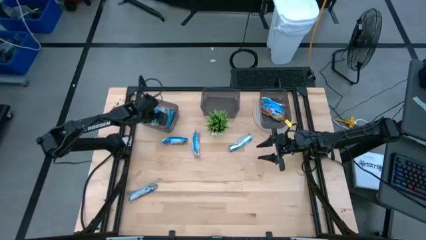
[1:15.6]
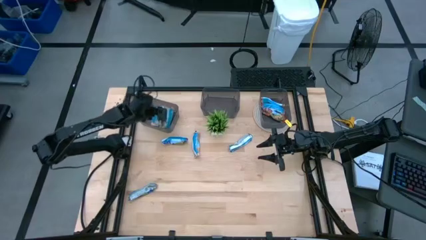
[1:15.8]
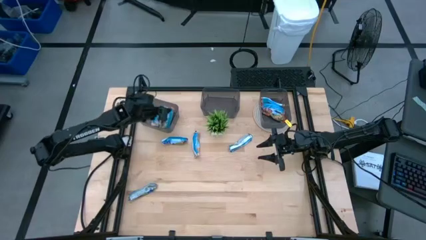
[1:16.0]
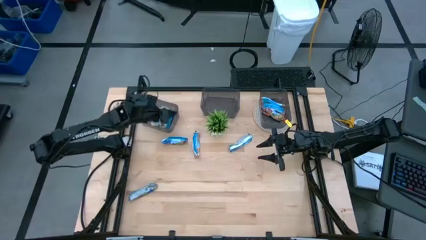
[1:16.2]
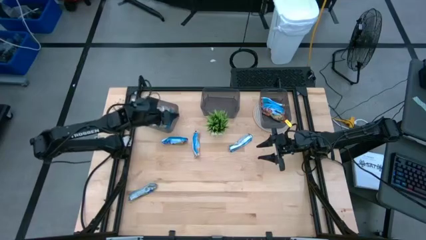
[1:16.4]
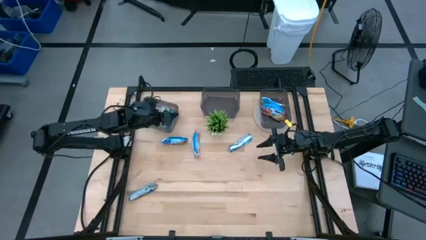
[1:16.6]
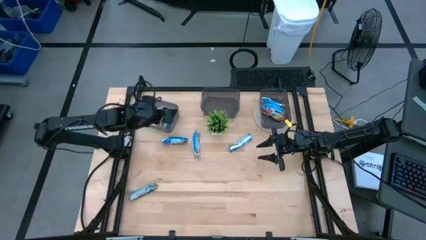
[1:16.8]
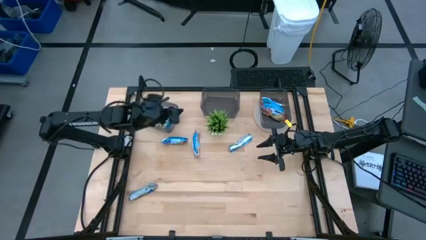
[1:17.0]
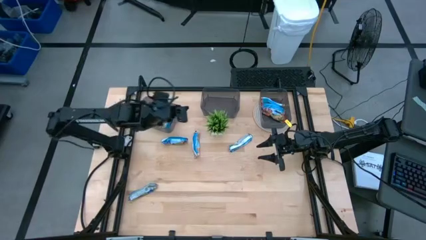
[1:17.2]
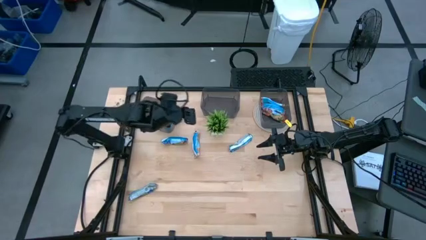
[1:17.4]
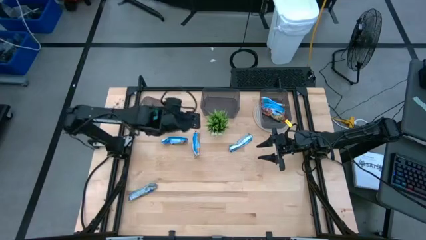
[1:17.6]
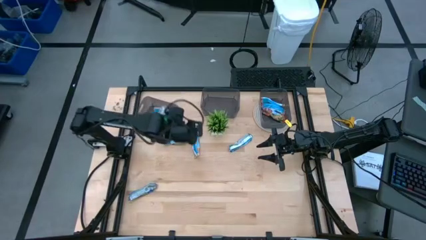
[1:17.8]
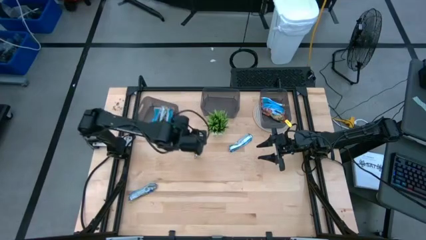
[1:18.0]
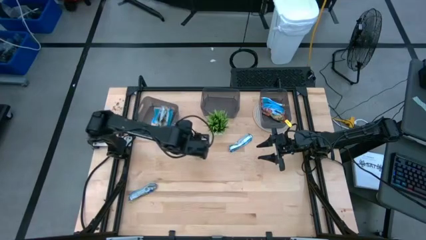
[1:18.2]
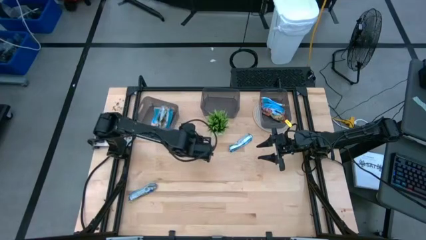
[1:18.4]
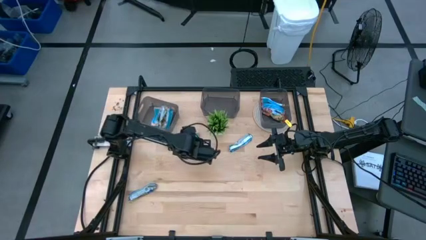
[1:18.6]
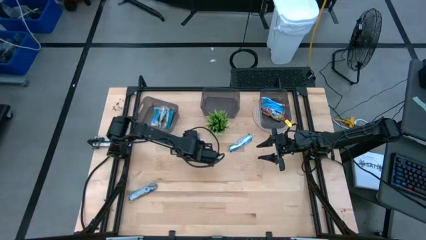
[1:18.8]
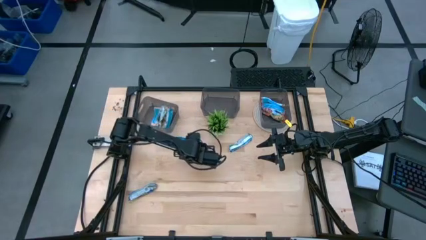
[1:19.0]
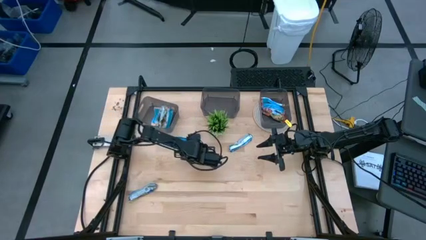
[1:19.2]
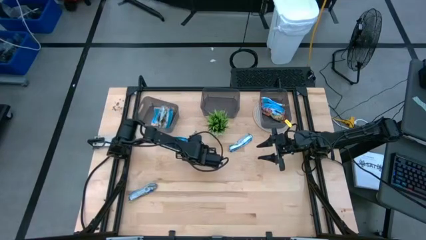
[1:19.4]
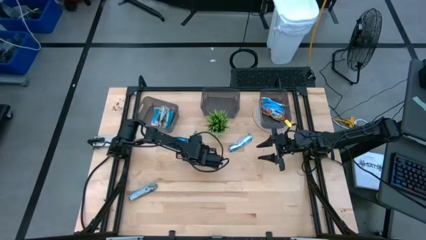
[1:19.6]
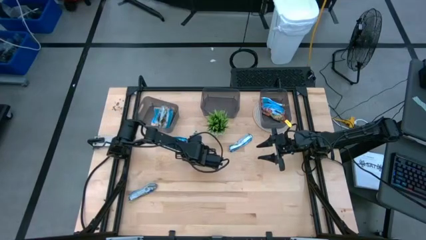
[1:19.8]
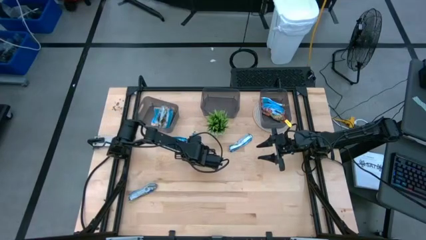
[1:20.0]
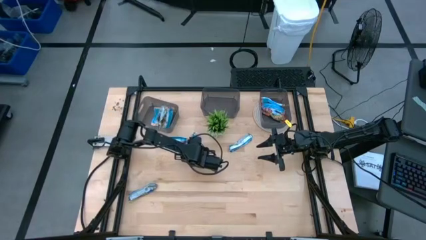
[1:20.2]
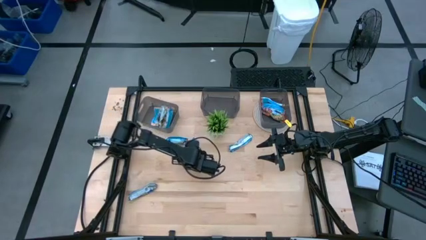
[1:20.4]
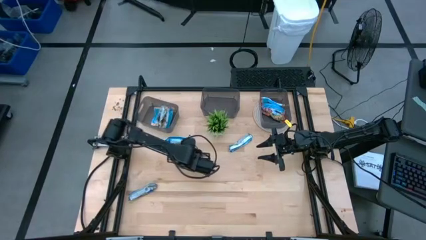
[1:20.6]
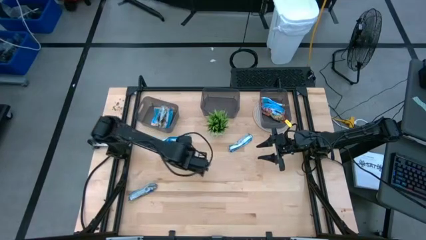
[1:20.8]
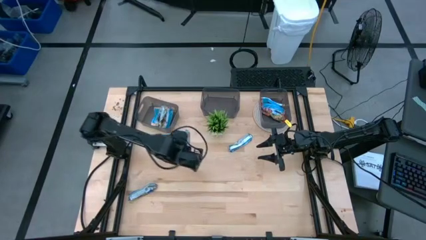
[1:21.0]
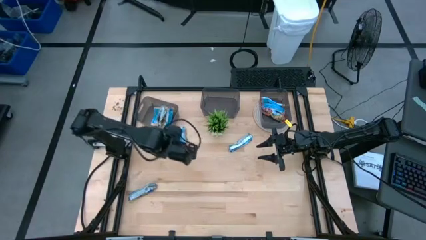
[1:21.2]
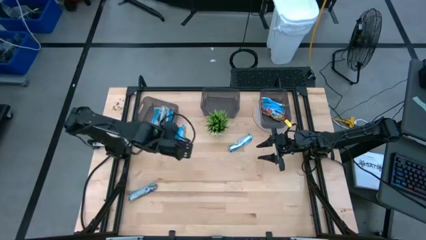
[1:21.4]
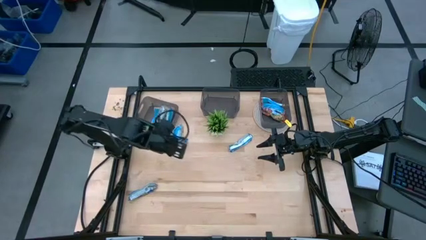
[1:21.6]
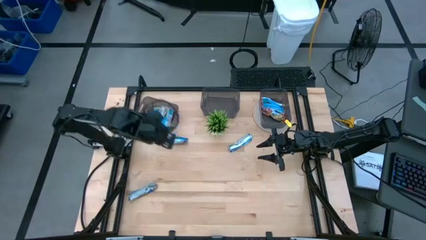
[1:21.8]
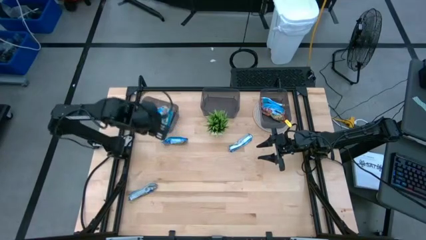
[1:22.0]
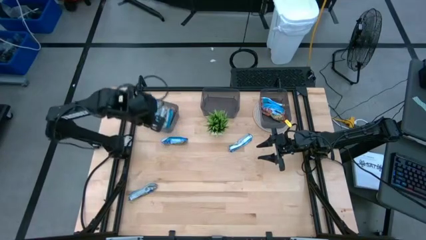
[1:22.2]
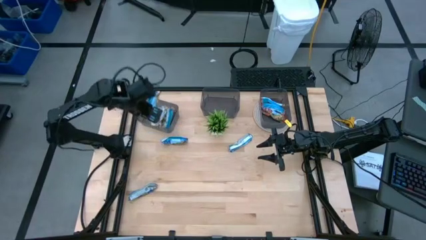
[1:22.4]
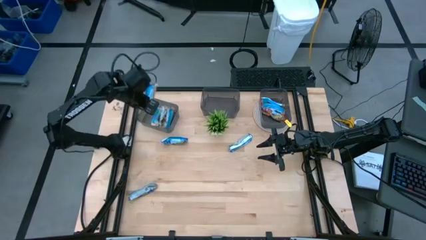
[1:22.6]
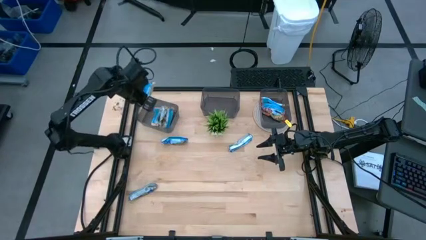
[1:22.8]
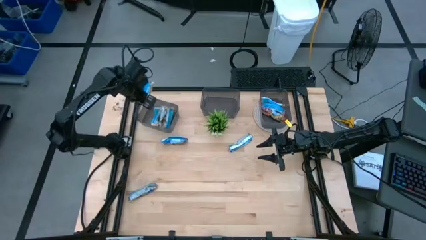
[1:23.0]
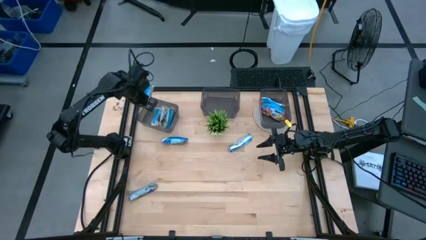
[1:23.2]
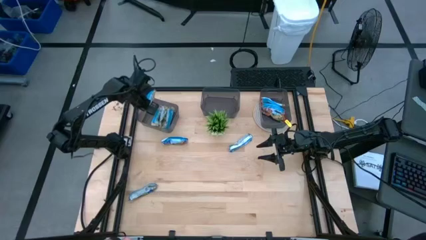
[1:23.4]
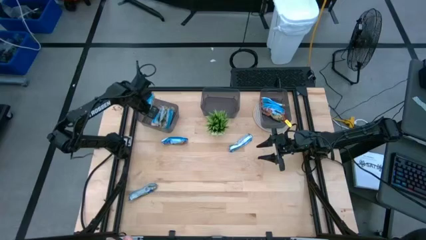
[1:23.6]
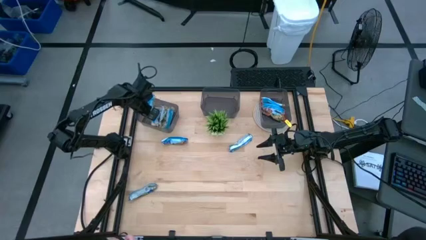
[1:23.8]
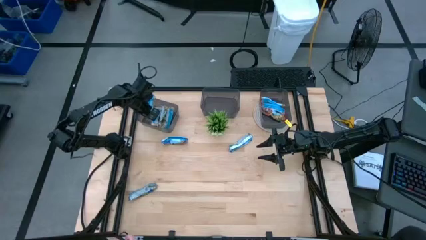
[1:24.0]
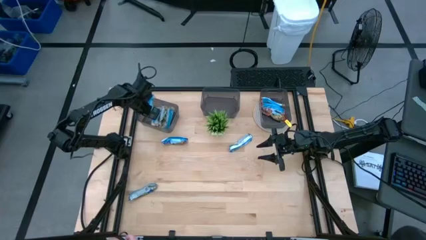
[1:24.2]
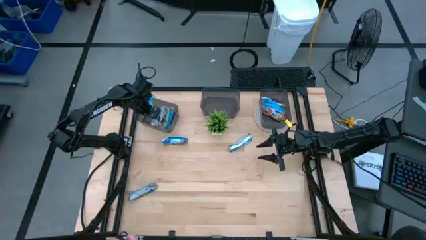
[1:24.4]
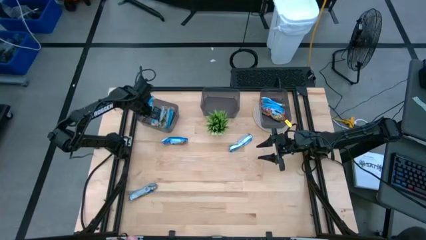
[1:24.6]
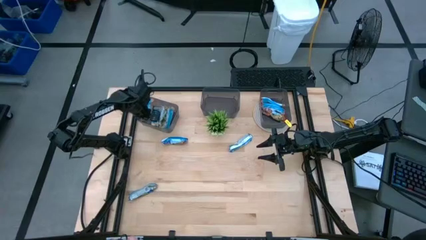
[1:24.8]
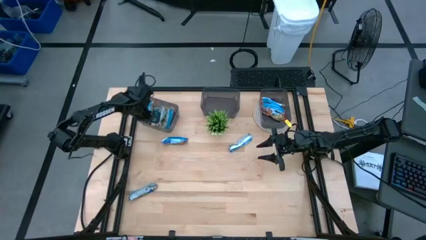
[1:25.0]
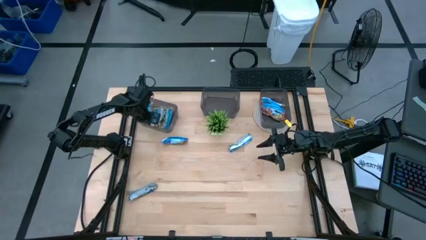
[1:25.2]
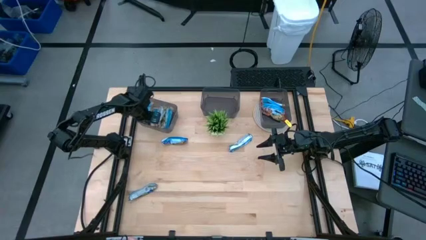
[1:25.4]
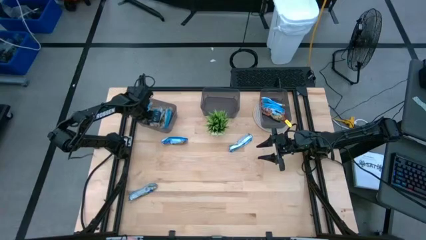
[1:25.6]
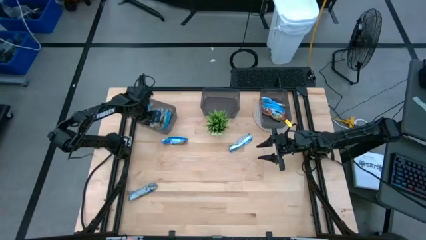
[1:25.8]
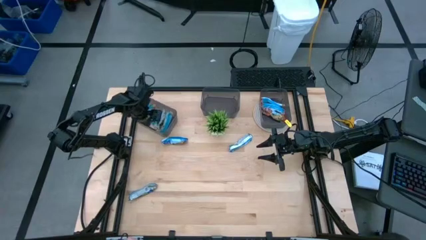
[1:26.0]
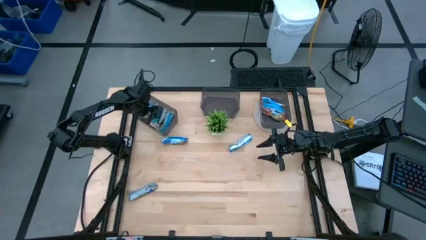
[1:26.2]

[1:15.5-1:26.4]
Task: Pick and place Granola Bars by type
Put the yellow granola bar into the left black bin

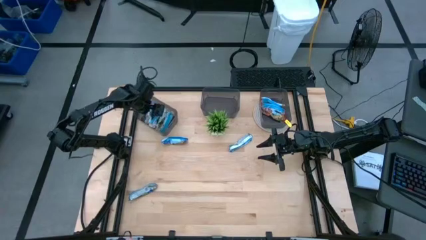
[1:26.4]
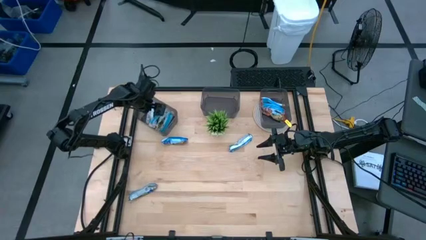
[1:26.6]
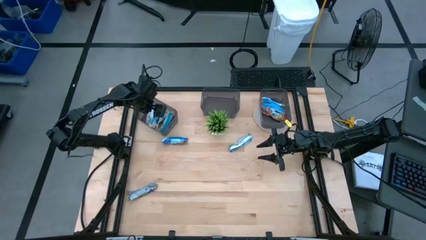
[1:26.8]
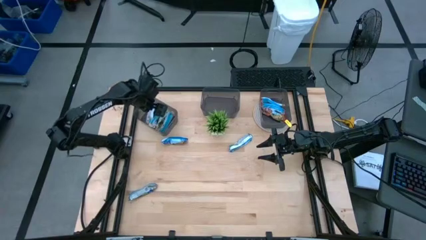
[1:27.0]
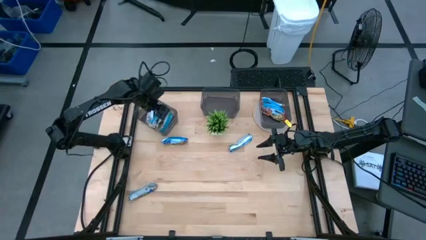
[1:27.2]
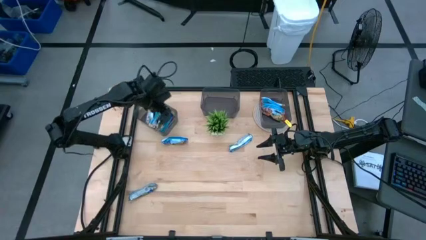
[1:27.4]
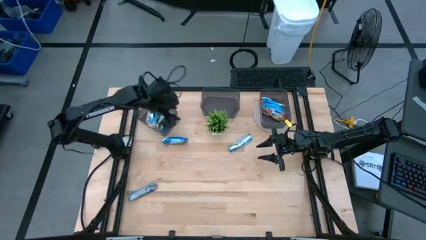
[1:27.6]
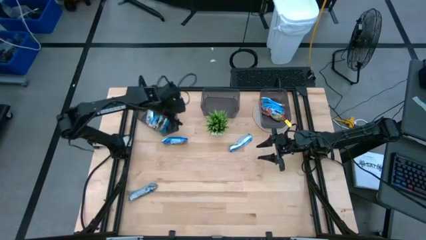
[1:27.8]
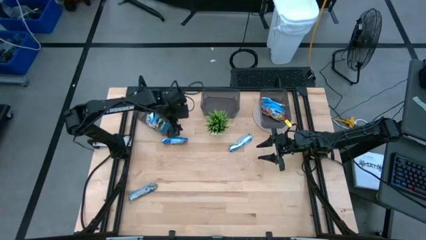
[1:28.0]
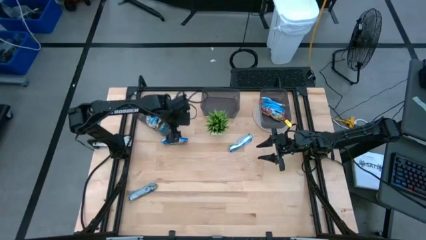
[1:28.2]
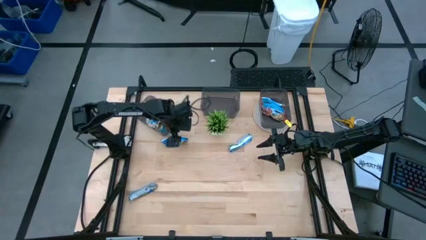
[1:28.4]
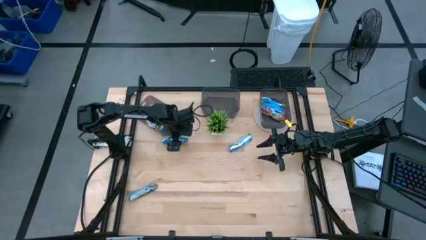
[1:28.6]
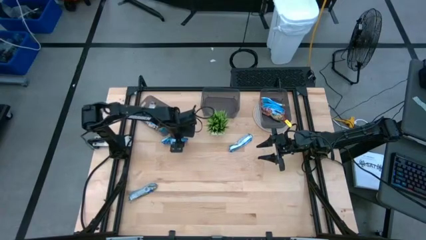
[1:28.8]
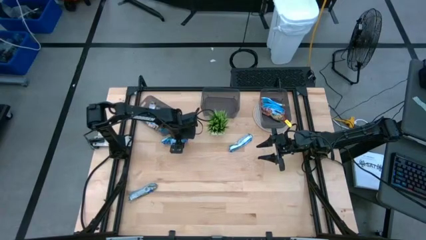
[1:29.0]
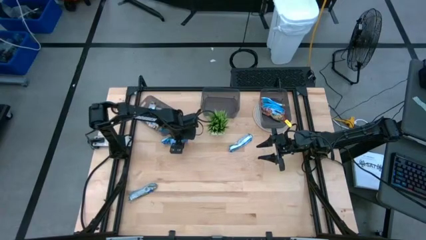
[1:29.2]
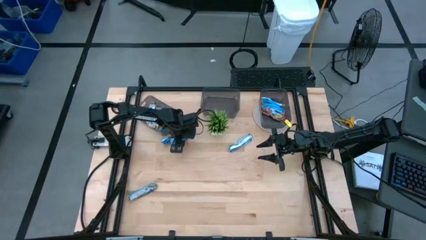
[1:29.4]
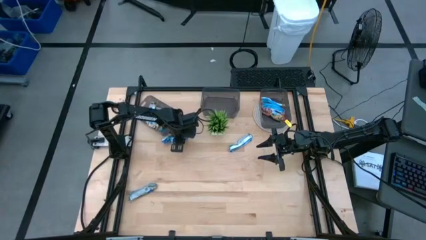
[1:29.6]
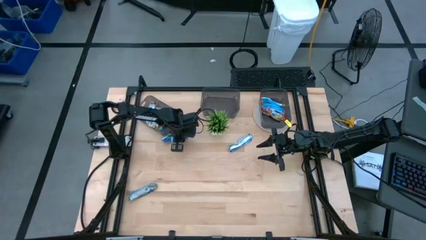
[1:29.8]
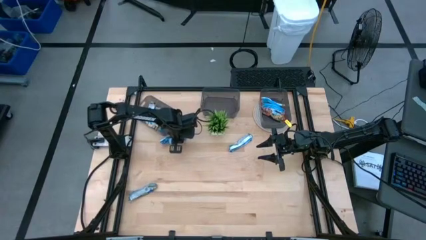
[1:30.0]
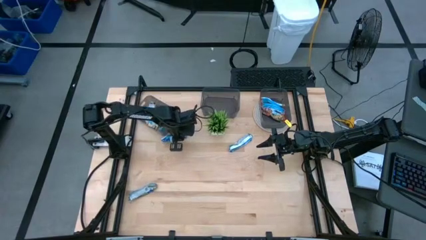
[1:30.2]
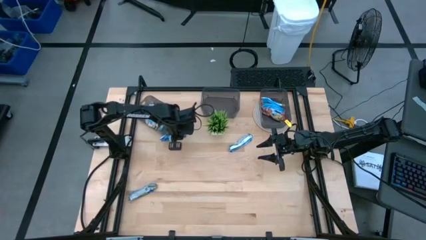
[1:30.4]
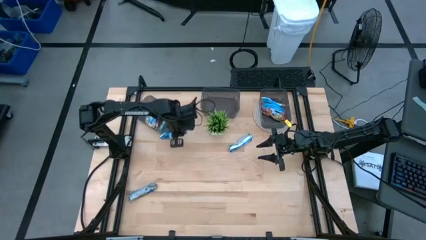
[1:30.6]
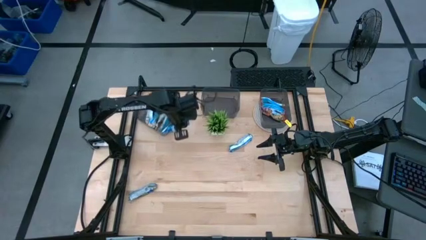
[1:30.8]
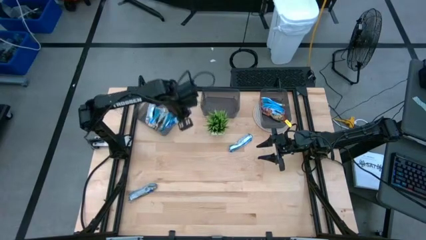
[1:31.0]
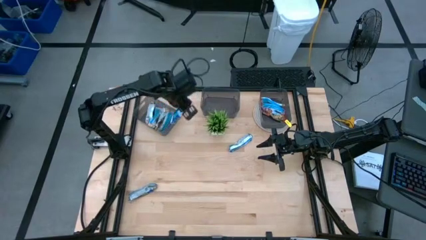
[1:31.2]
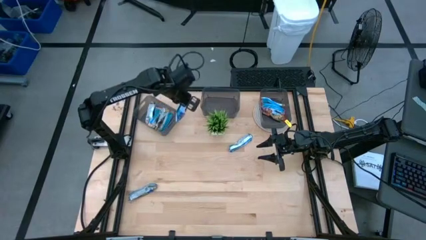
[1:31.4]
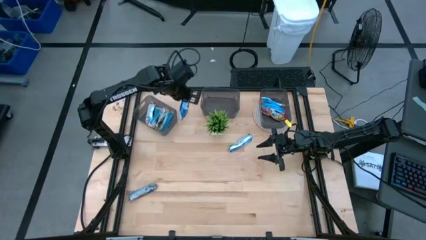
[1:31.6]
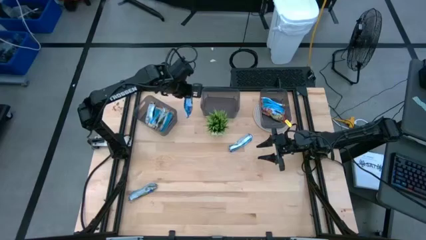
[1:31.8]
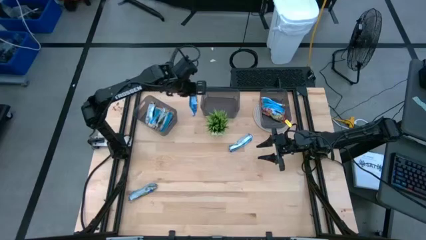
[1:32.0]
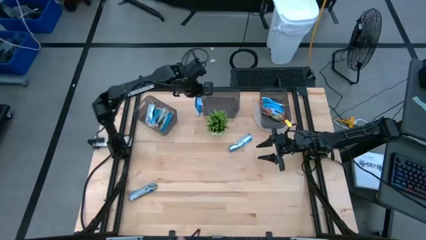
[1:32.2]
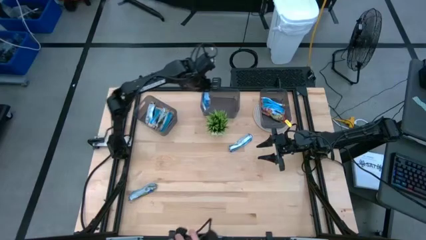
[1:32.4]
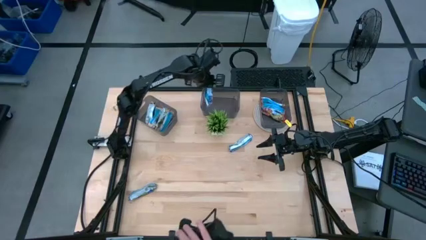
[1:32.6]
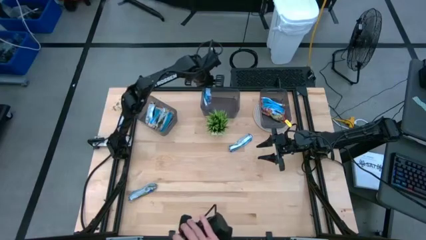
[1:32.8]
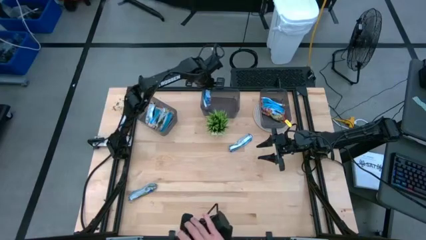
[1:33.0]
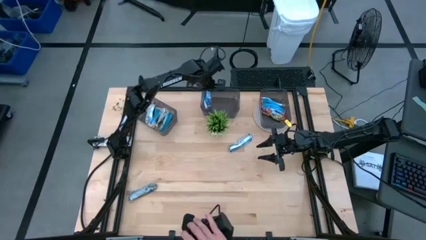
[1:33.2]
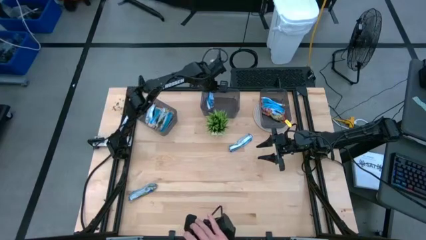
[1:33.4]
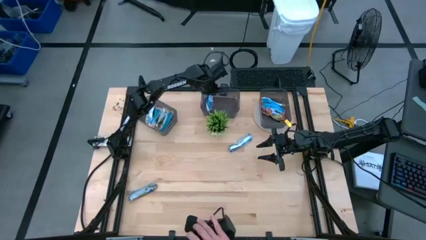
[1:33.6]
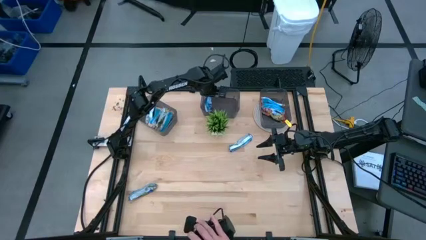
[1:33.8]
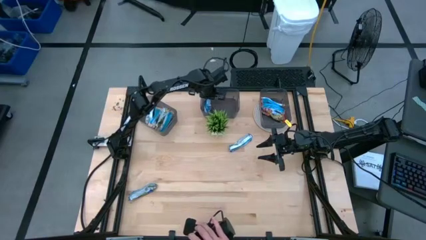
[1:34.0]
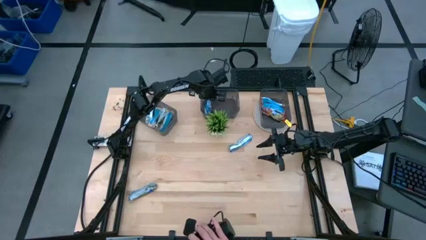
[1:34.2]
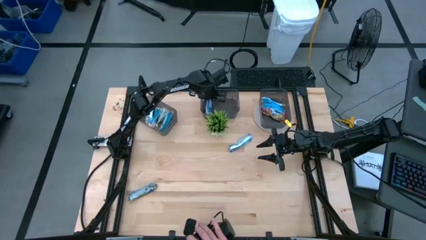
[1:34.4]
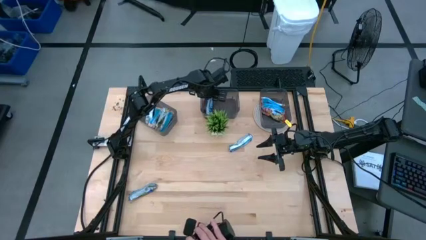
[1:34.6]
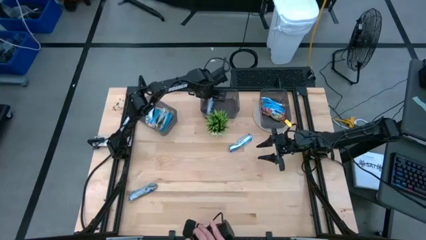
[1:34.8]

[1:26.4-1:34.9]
Put the blue granola bar into the middle black bin
